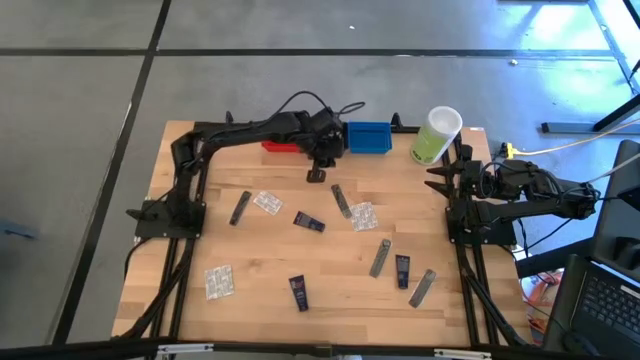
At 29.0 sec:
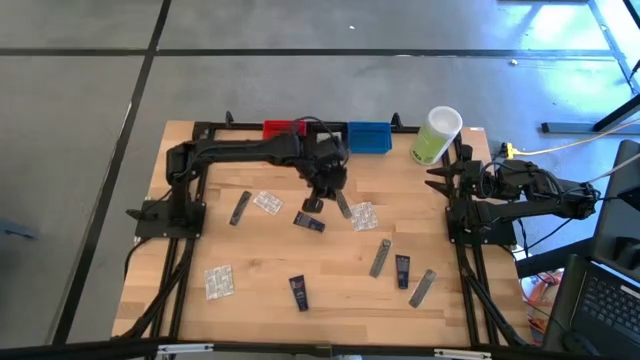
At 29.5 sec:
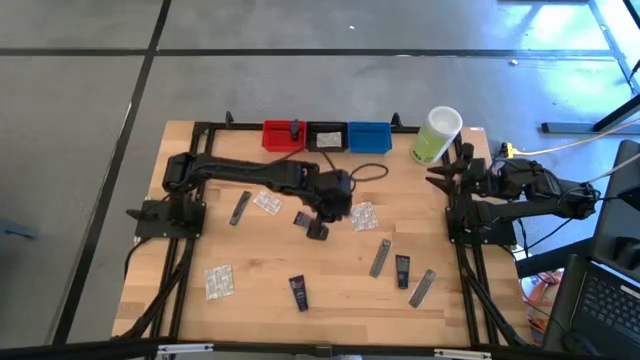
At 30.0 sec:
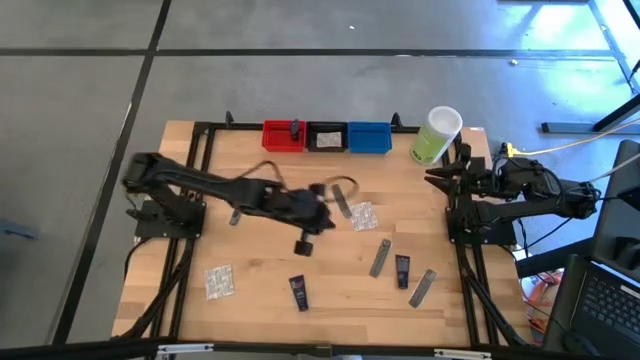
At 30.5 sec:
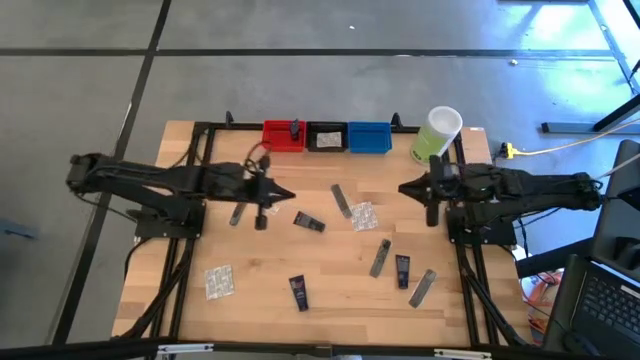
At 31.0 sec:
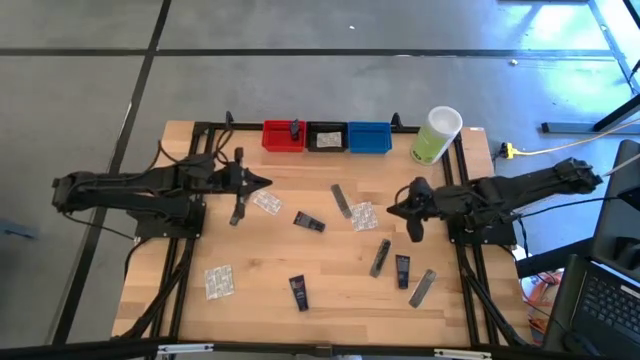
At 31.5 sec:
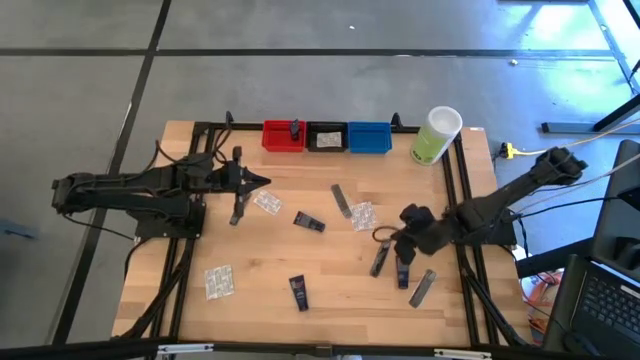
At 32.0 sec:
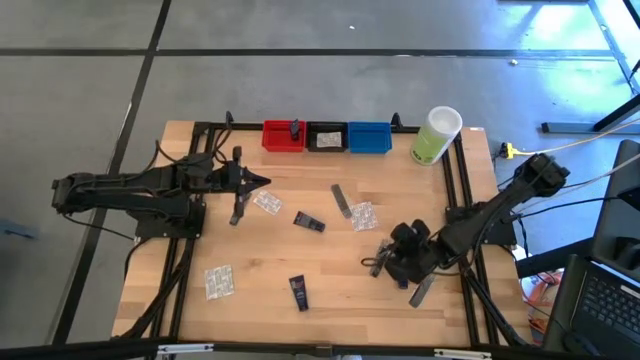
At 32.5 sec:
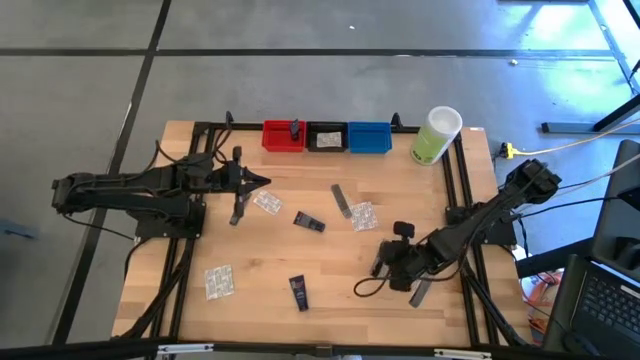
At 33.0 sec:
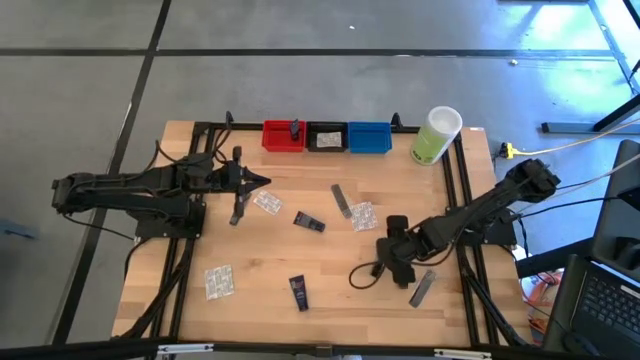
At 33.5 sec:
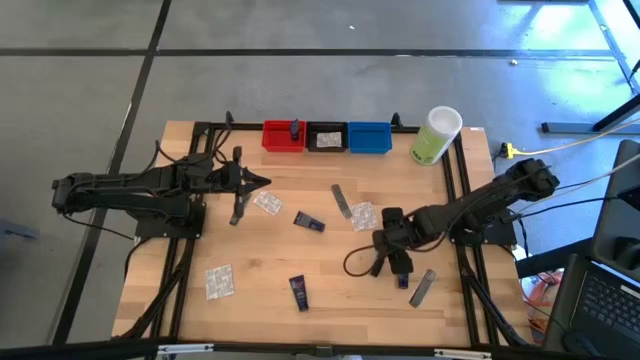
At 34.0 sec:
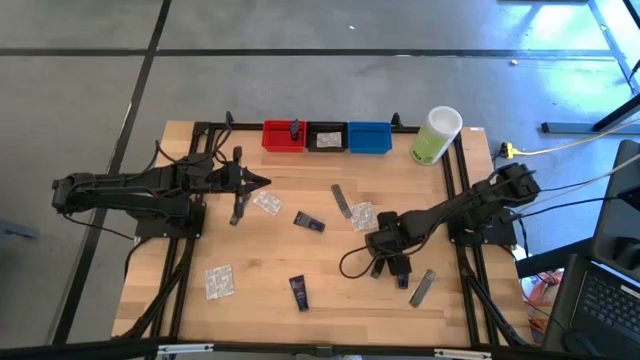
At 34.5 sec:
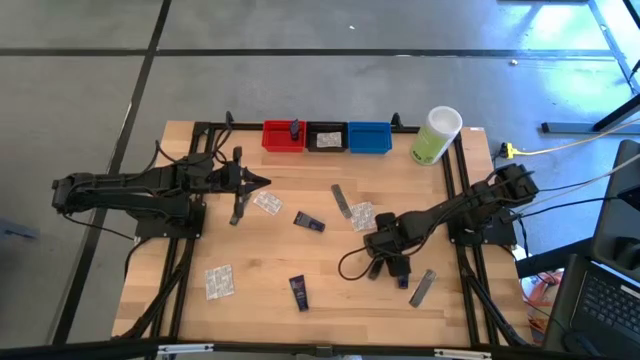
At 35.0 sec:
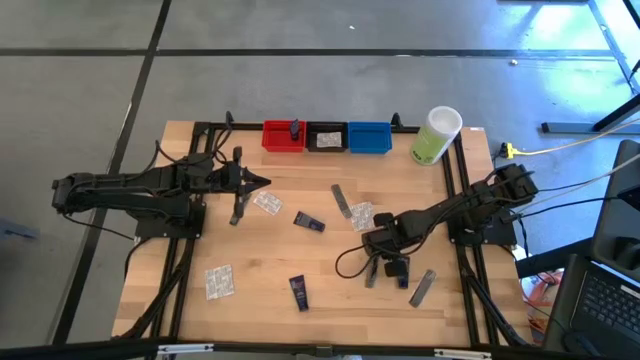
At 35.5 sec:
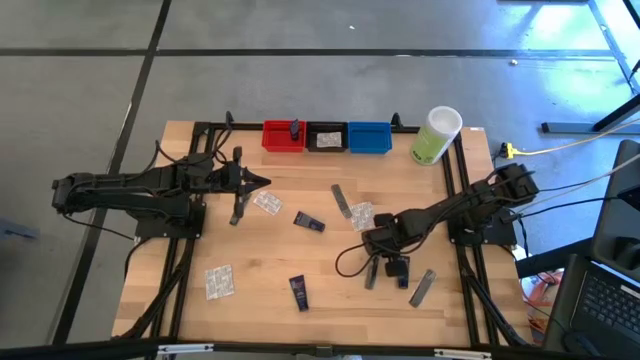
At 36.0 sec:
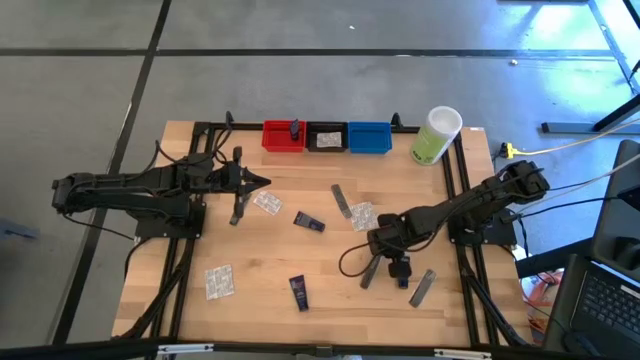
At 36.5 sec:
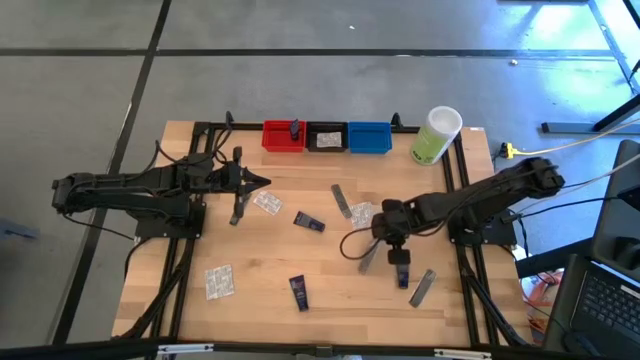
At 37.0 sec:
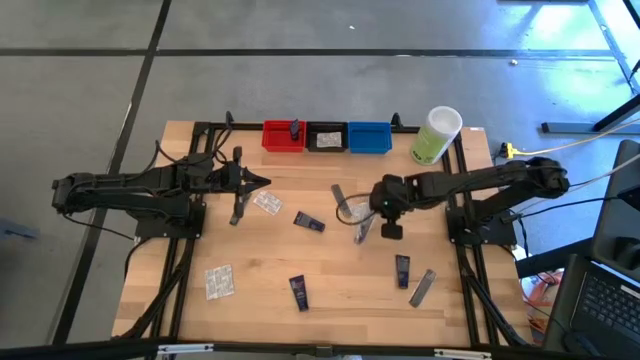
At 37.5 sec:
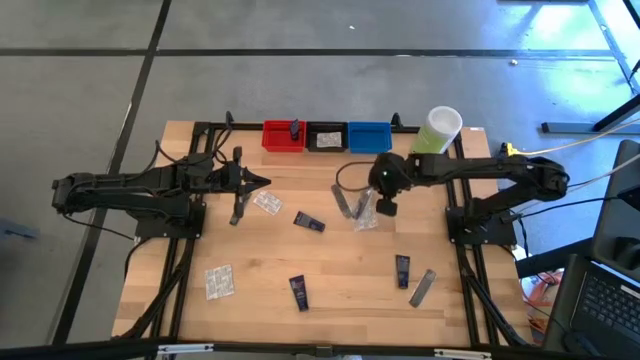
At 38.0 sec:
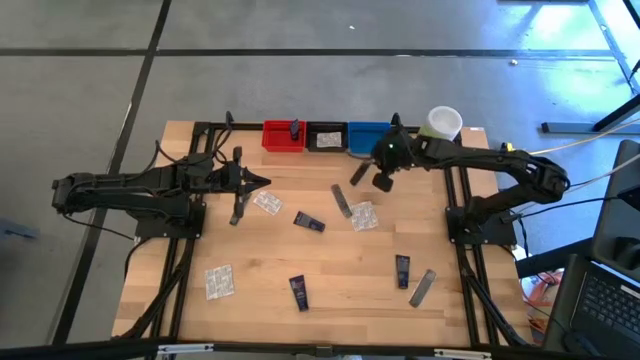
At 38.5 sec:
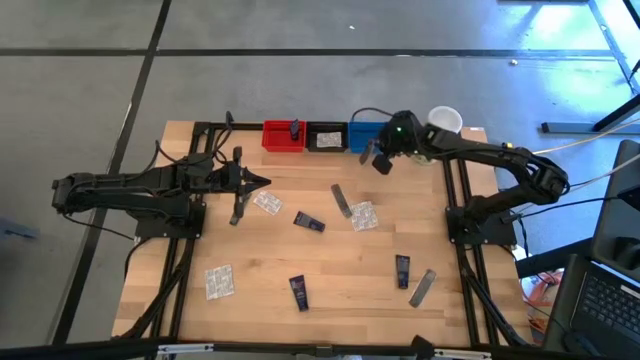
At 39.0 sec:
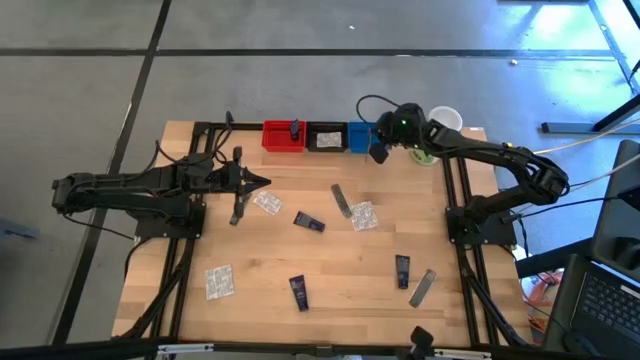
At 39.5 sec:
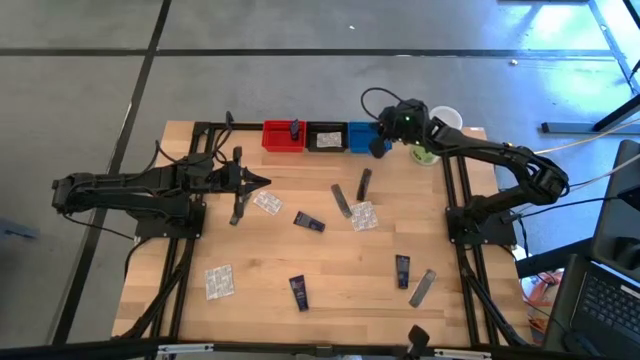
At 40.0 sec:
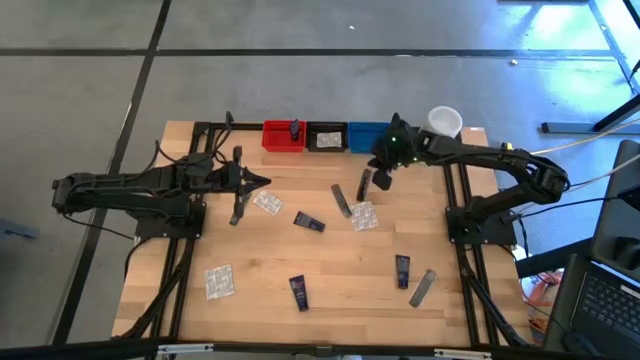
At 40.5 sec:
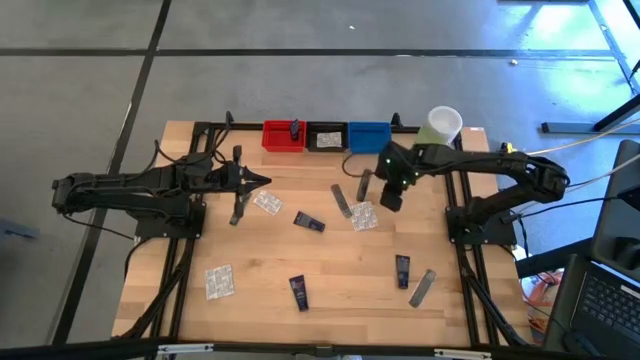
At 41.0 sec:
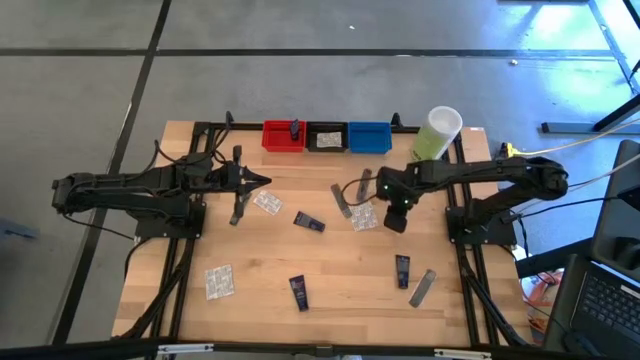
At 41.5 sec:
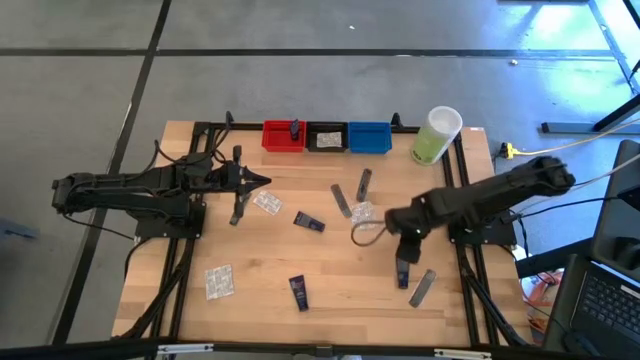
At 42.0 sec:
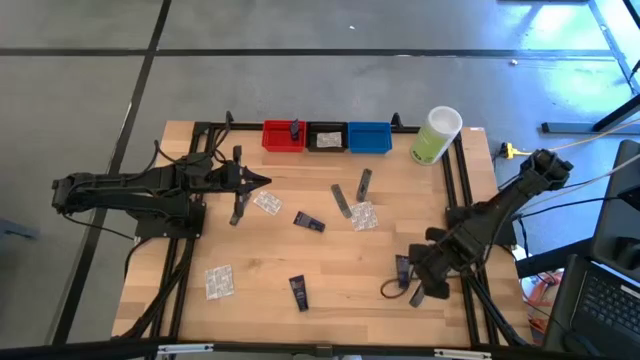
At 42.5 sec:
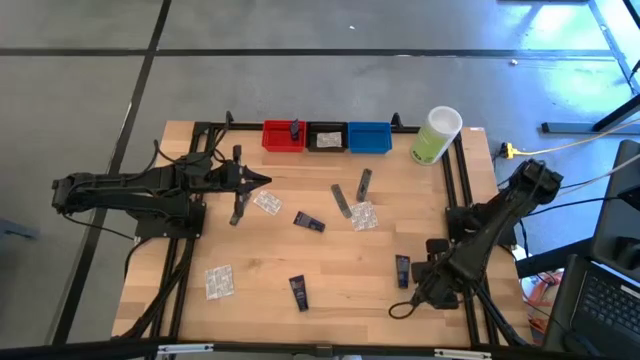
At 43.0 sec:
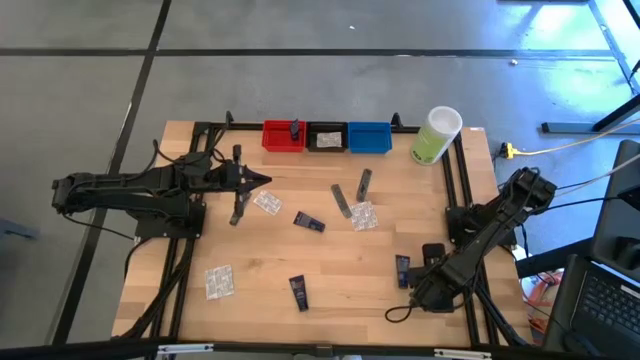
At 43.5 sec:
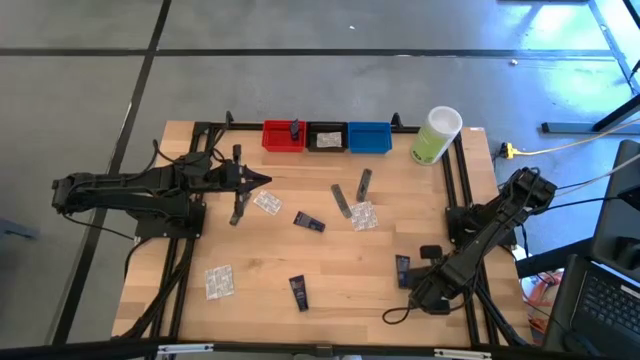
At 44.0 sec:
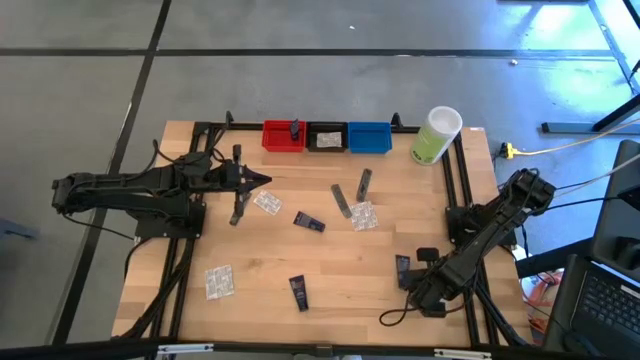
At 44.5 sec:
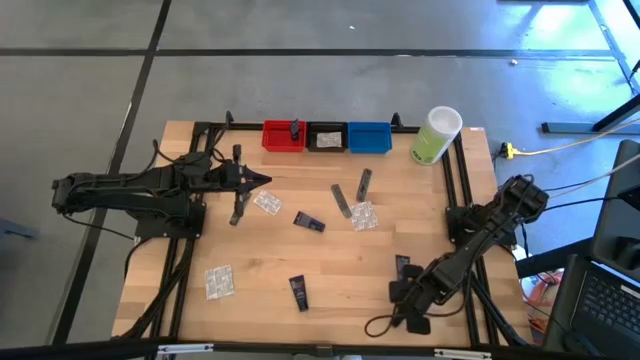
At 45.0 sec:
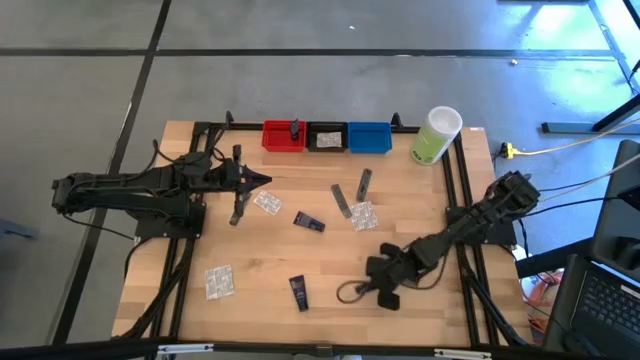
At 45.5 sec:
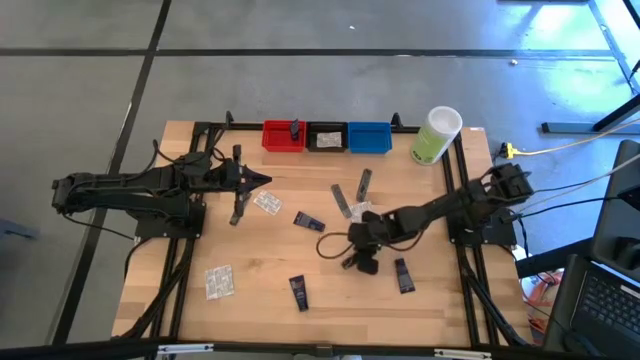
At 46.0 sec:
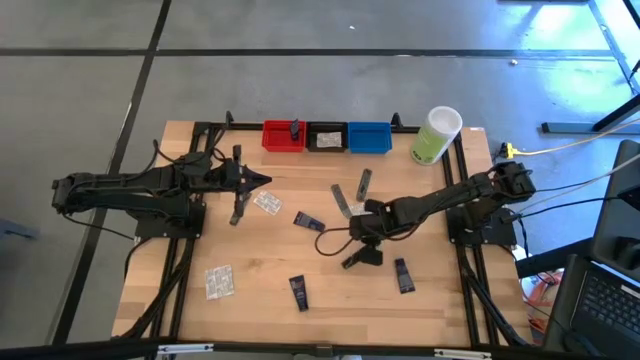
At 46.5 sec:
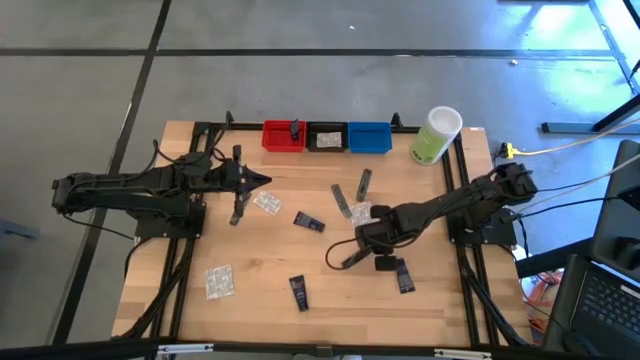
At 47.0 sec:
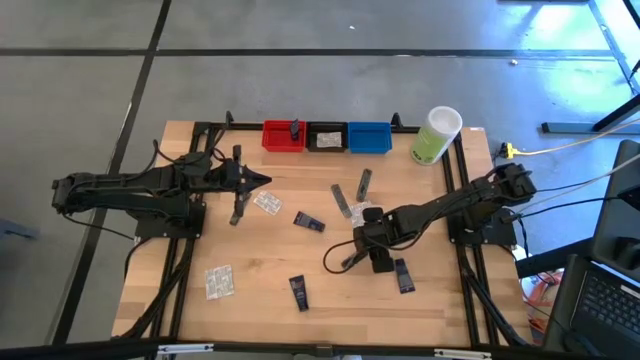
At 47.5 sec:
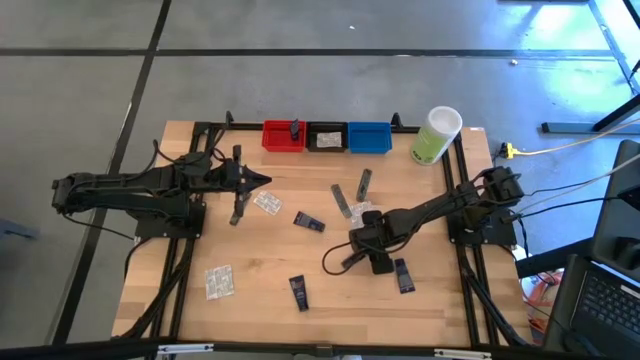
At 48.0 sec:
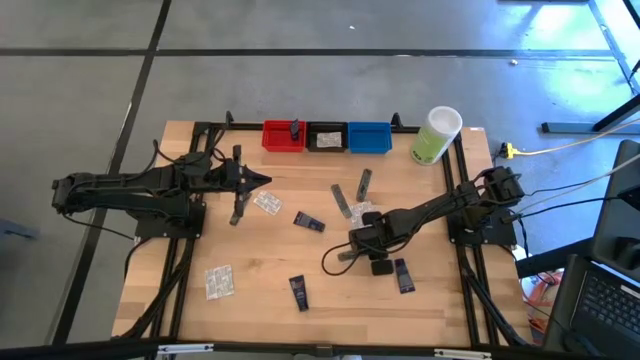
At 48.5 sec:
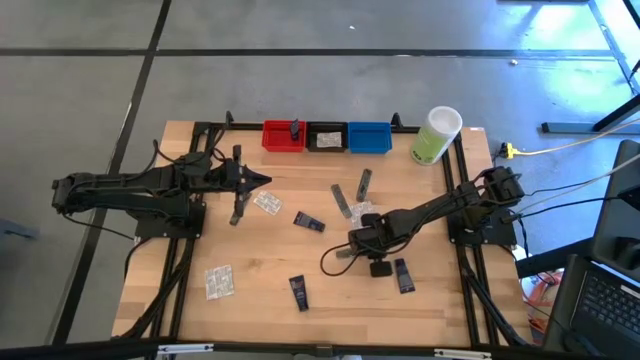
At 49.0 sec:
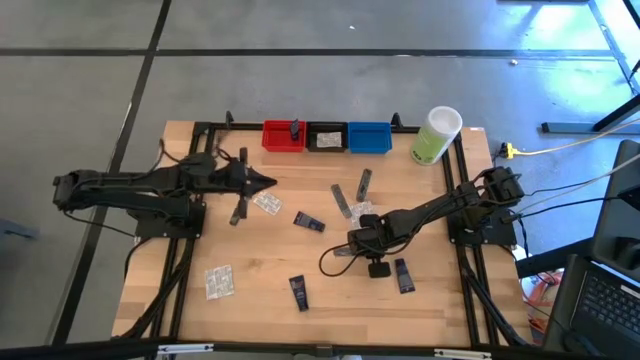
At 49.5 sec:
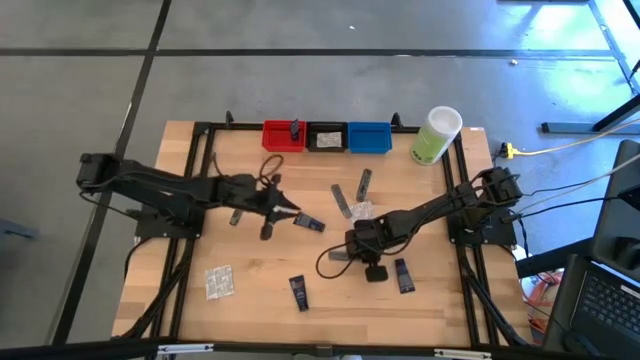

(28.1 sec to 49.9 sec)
Task: Pick & Place Travel size toiletries
Put the black comb into the blue bin
